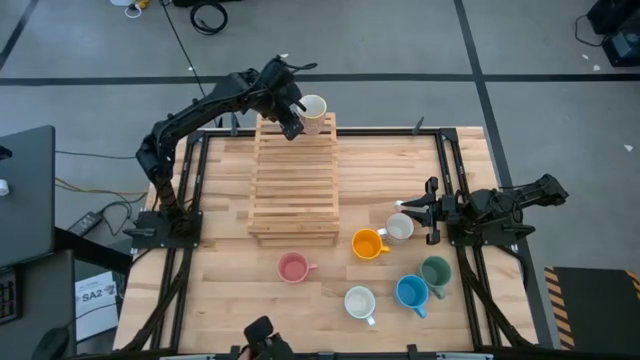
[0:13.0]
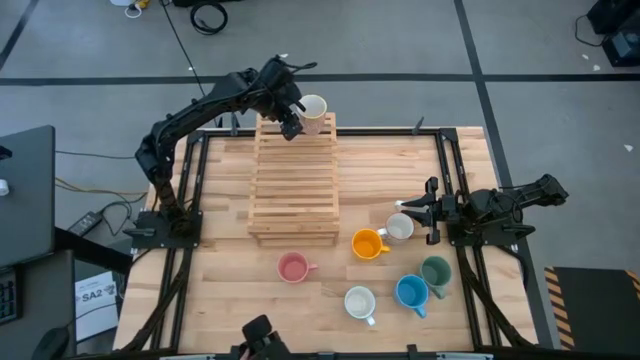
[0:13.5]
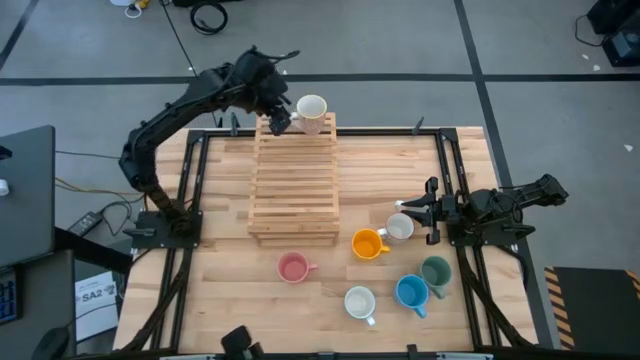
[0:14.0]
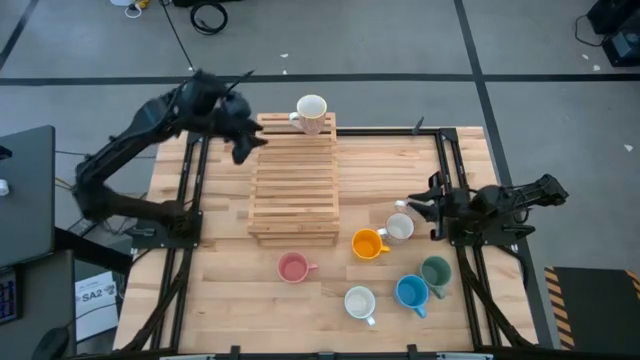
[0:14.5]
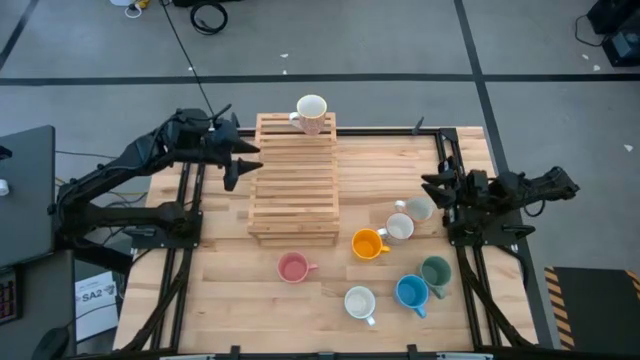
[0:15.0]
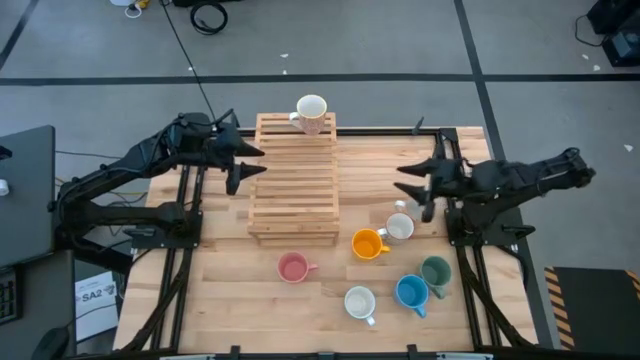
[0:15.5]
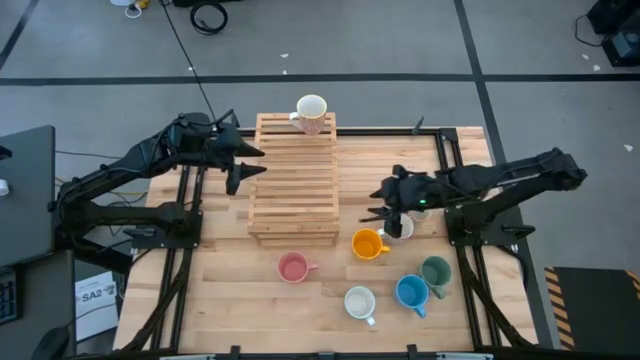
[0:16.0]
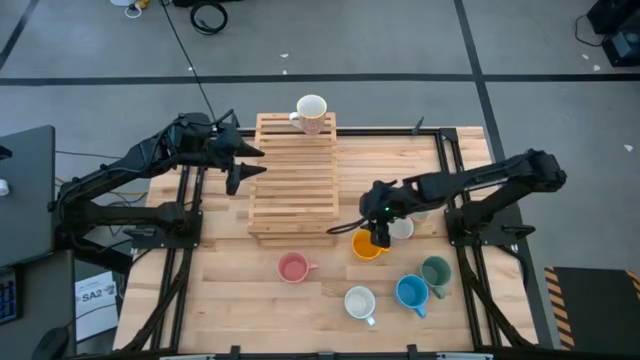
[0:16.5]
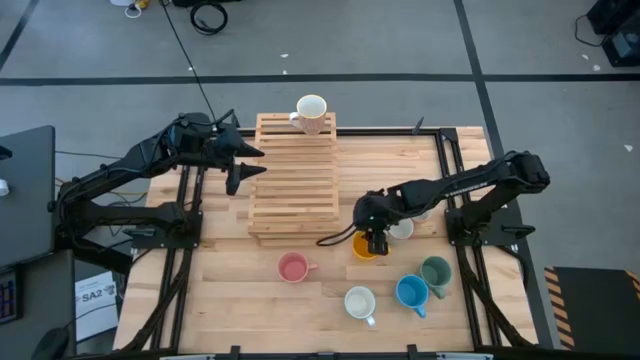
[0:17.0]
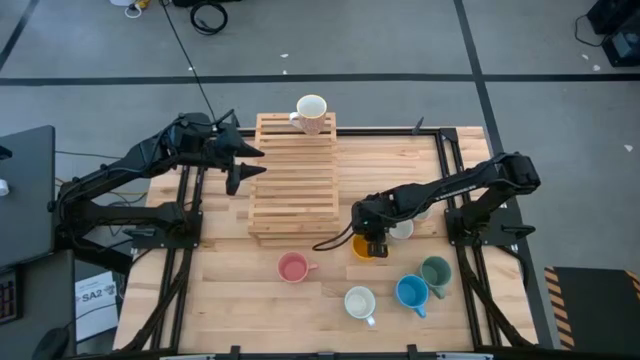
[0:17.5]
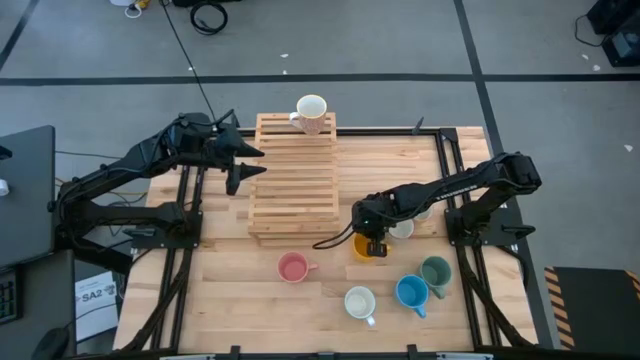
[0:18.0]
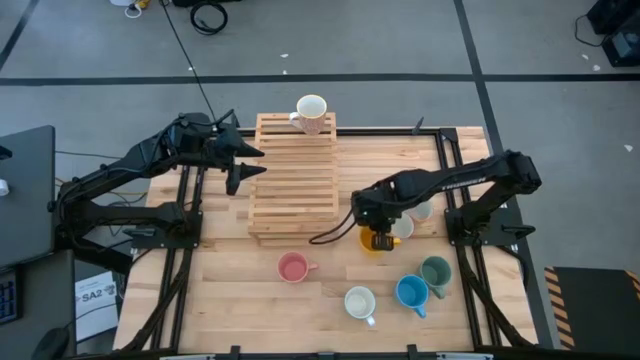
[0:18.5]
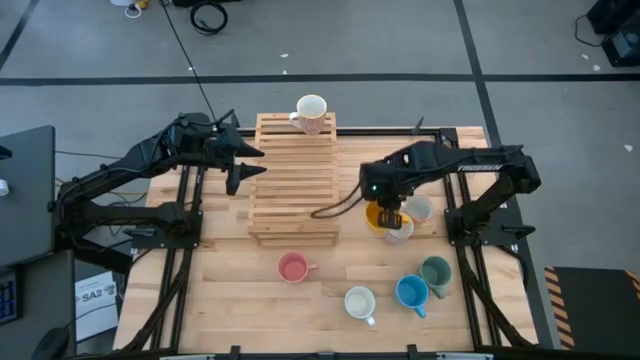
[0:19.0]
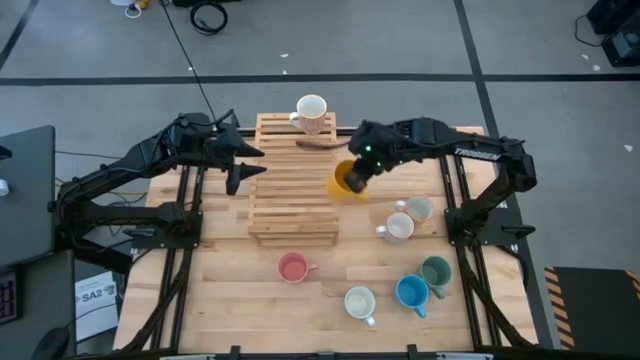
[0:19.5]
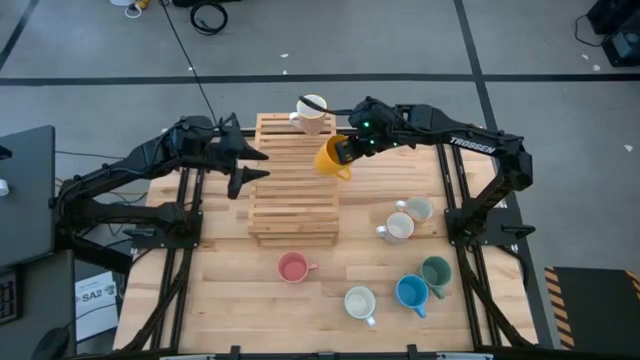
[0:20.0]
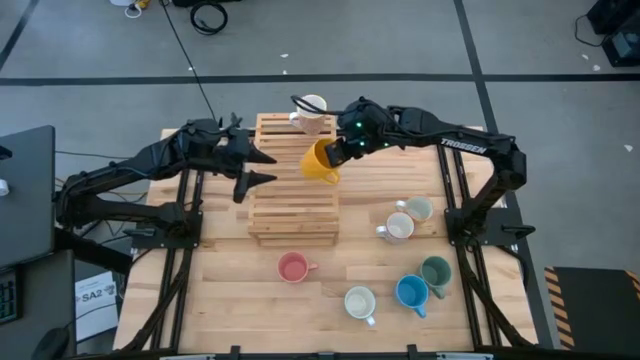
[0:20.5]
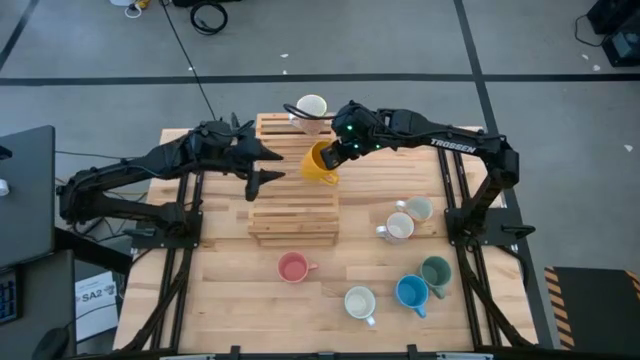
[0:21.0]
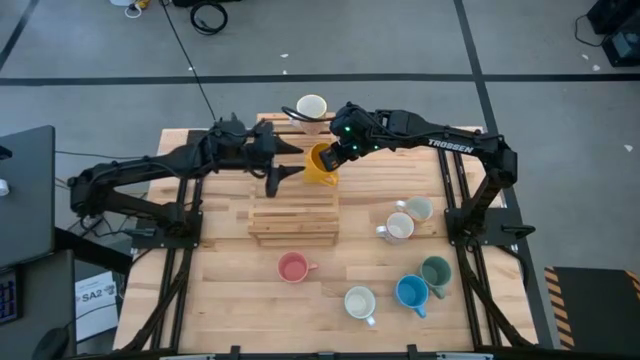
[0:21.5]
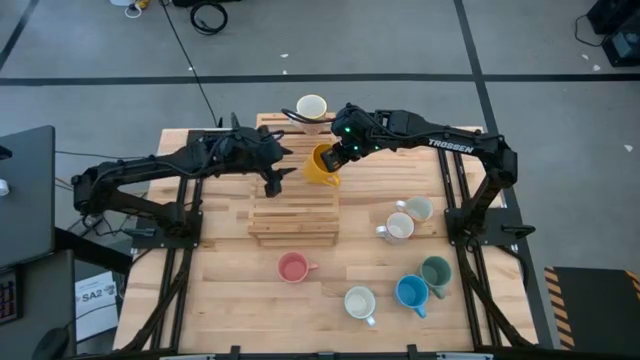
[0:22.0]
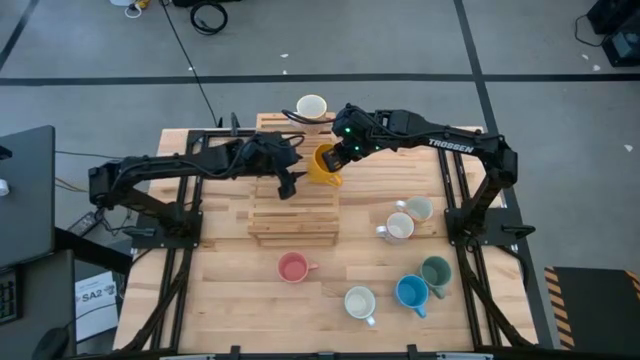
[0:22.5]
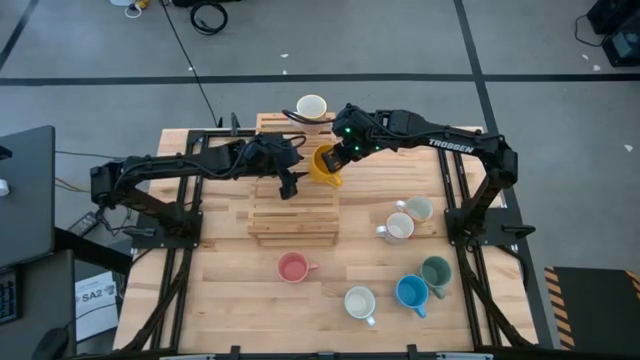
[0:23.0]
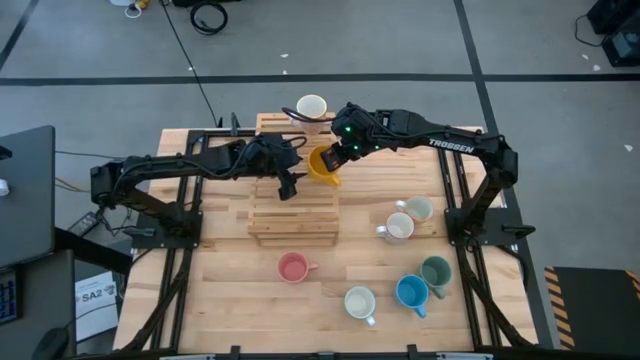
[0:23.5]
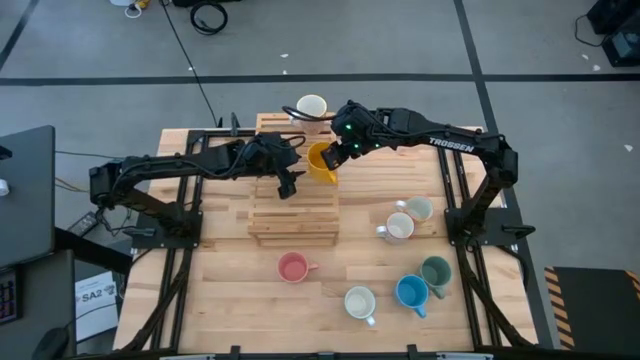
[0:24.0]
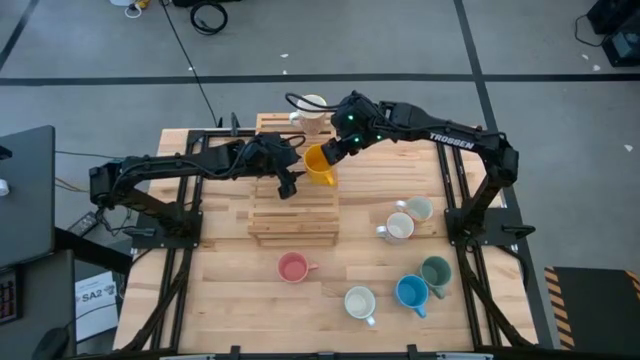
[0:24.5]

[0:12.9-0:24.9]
Task: Place coffee mugs
Put the yellow mug on the shelf

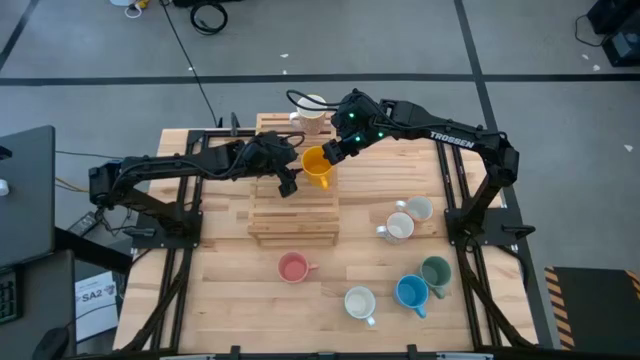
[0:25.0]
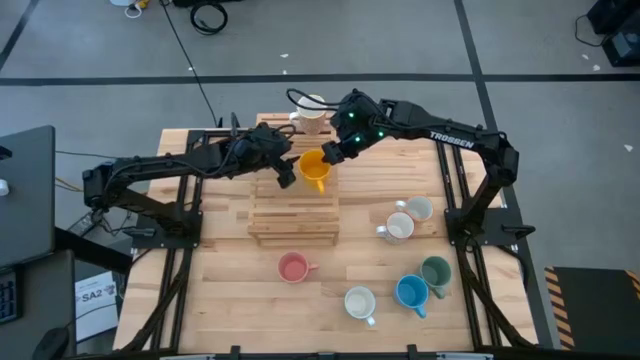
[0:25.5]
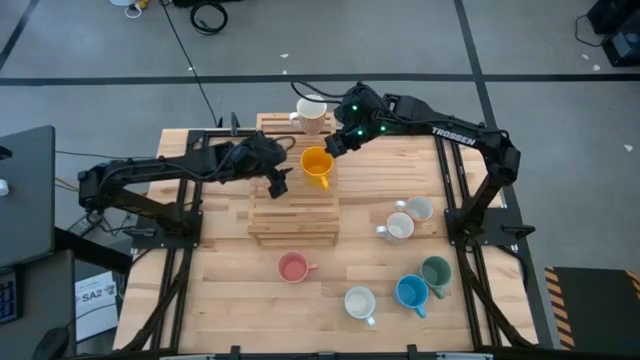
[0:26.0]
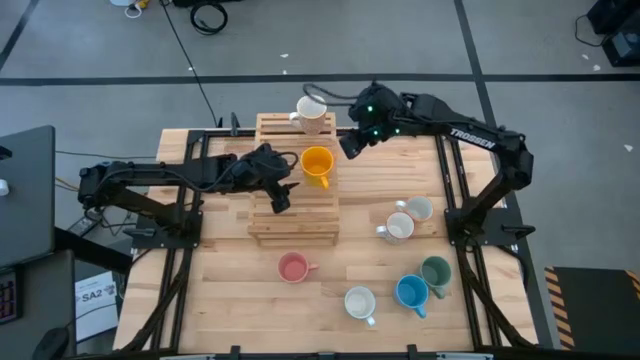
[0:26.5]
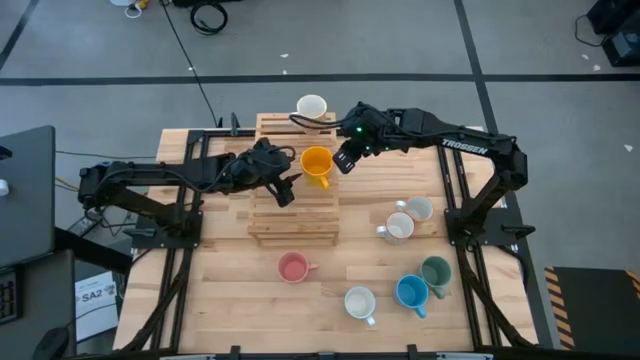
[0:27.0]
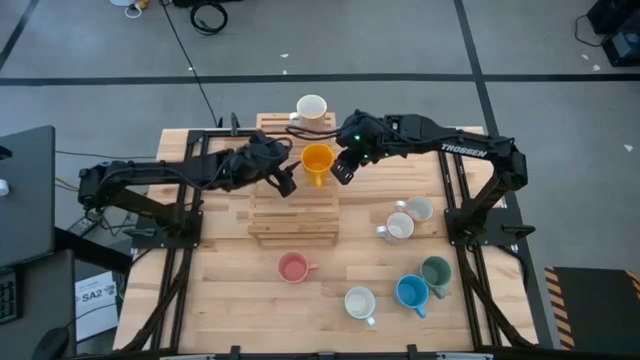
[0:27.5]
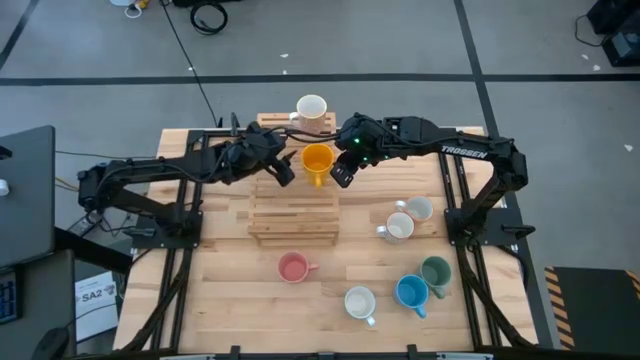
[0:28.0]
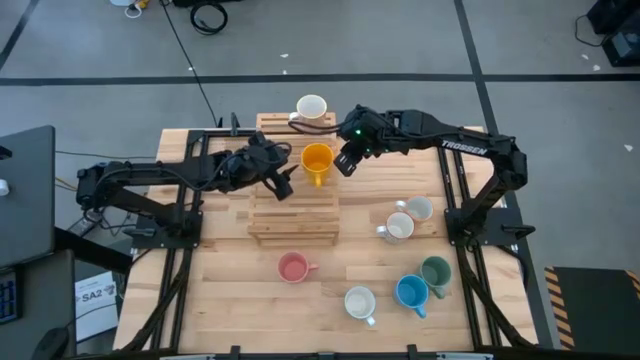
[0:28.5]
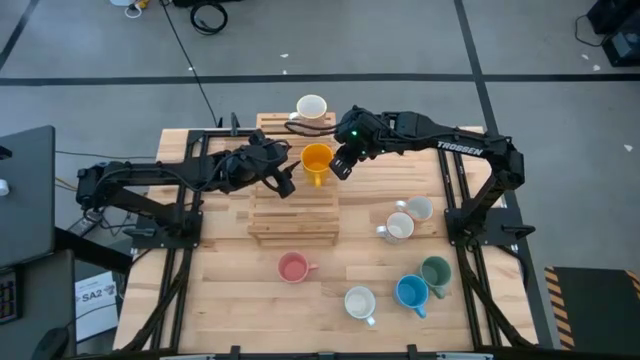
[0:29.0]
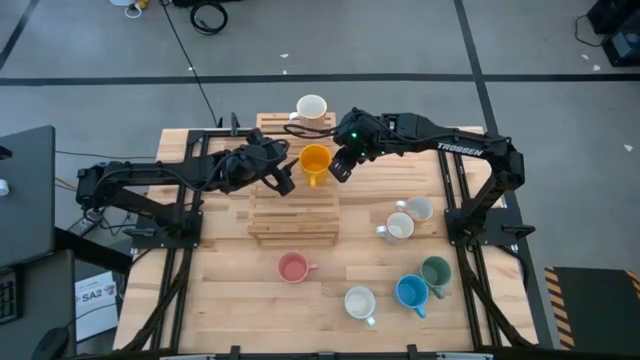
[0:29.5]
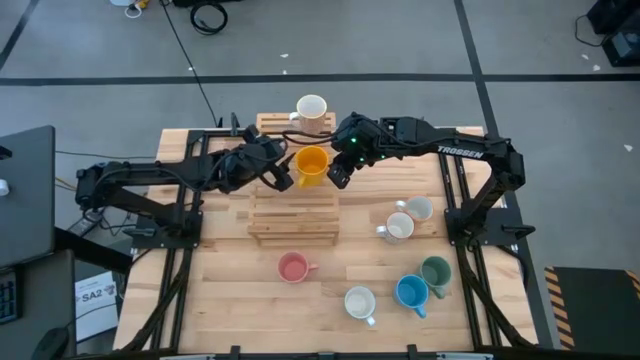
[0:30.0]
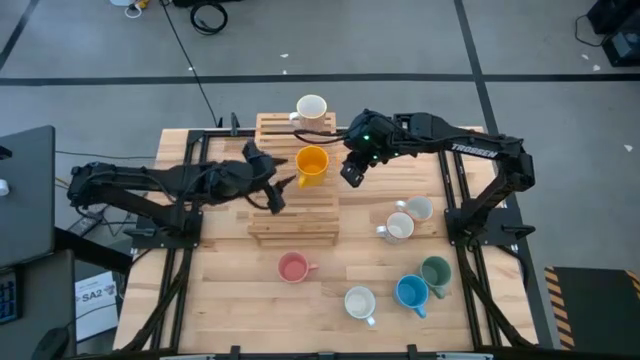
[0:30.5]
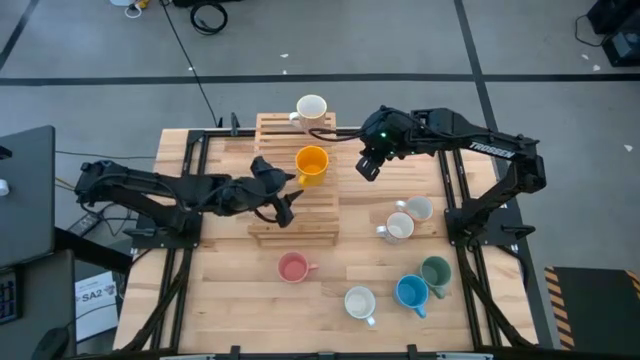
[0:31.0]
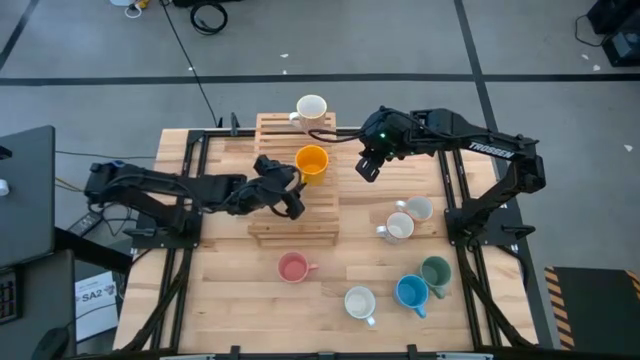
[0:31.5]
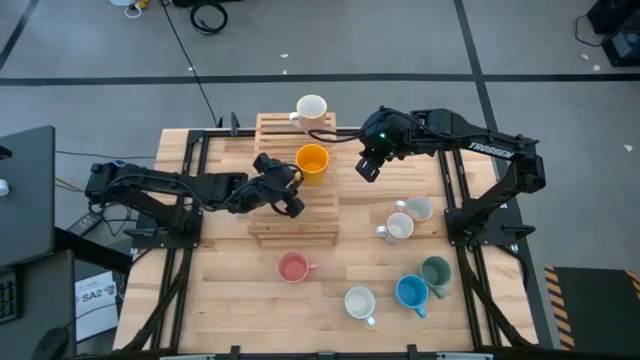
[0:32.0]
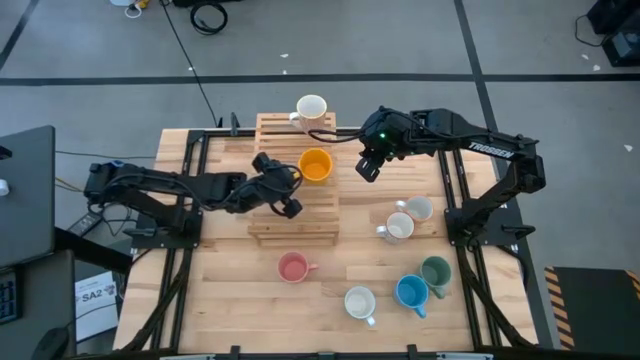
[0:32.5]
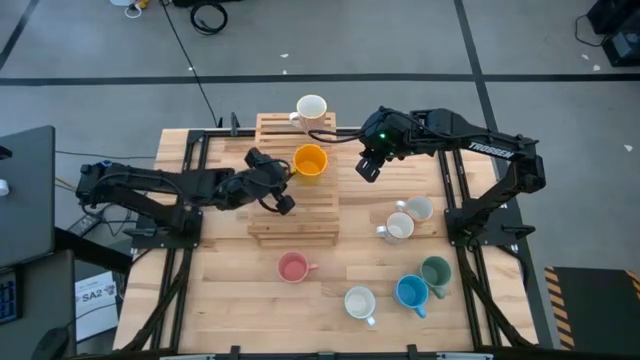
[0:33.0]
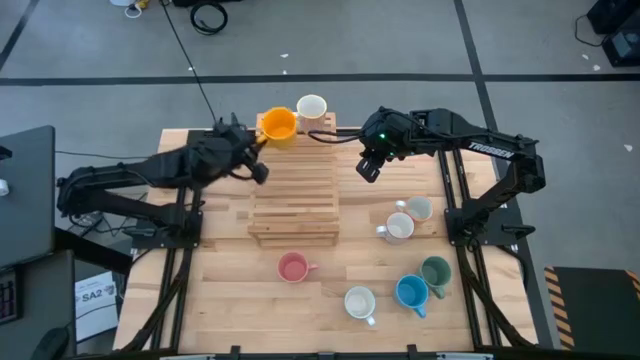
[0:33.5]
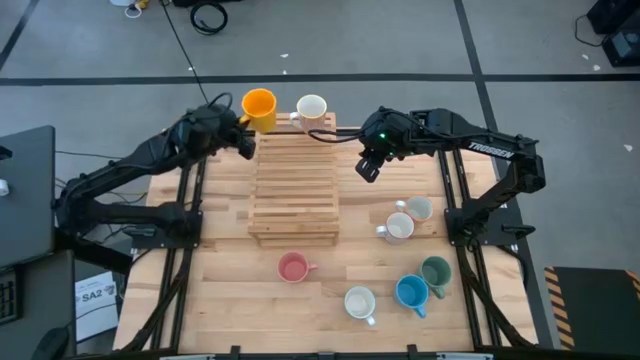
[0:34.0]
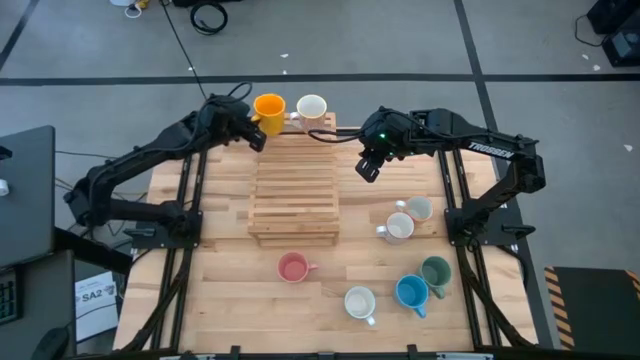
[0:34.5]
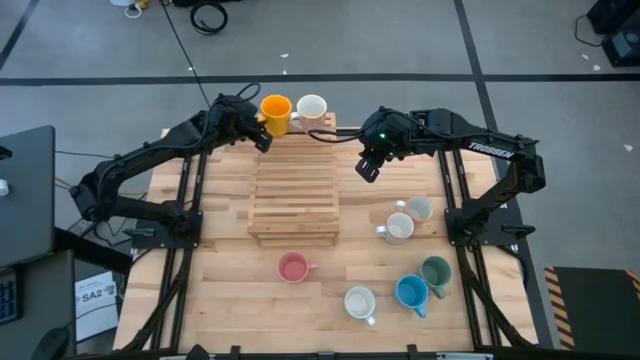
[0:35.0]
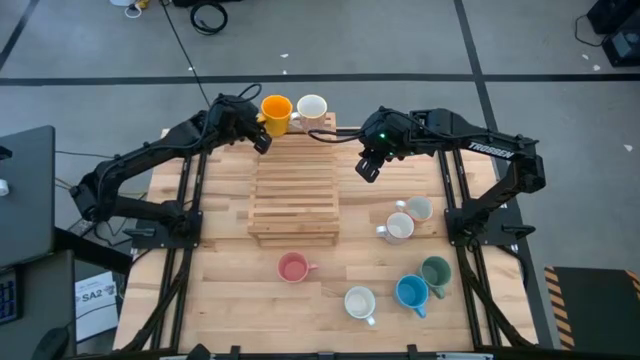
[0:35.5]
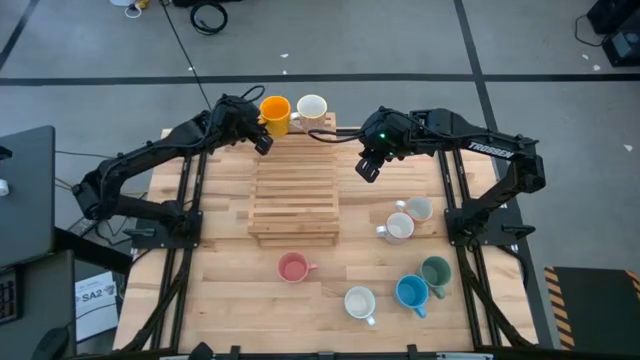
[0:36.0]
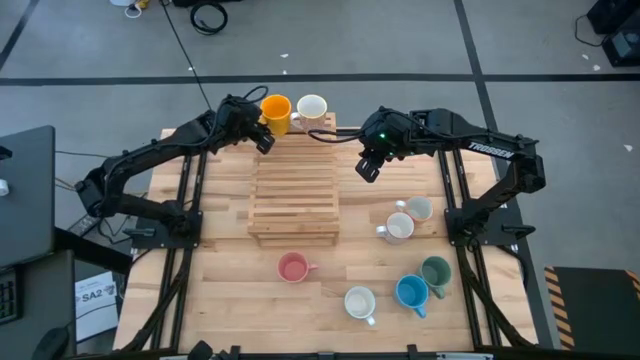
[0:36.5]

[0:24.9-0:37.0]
Put the yellow mug on the shelf
